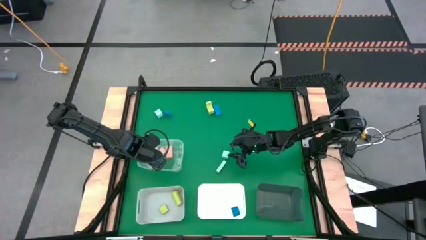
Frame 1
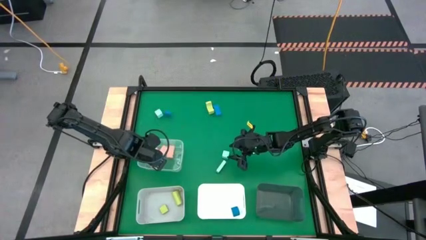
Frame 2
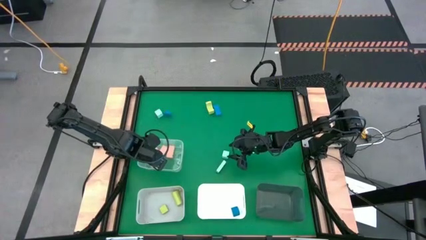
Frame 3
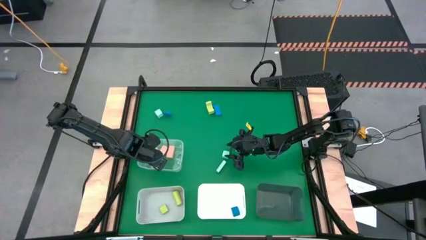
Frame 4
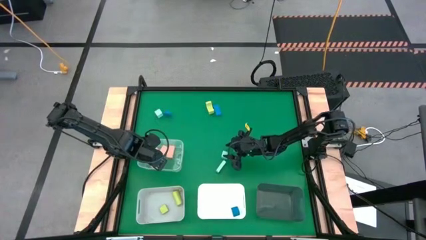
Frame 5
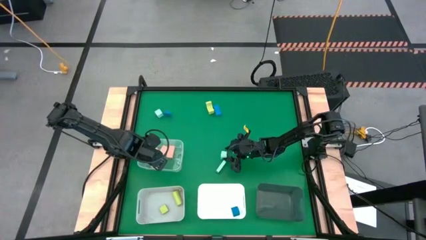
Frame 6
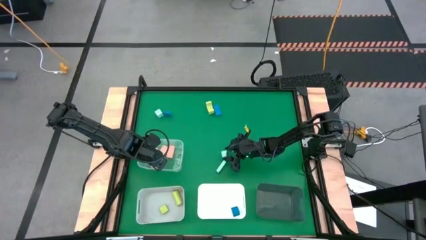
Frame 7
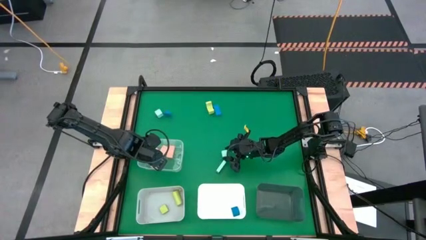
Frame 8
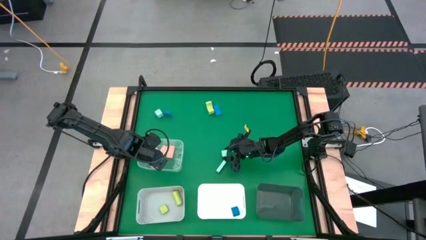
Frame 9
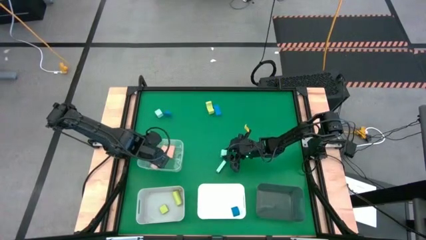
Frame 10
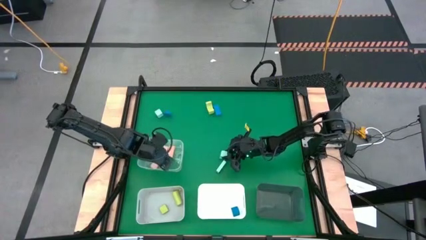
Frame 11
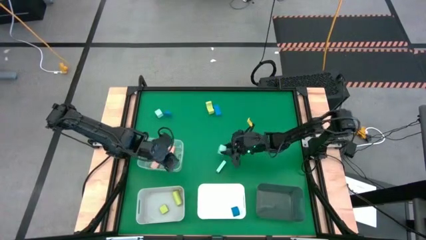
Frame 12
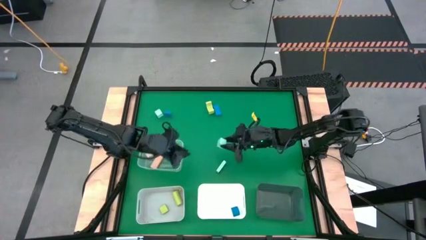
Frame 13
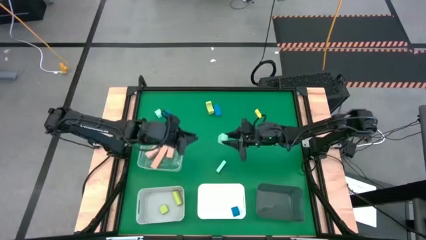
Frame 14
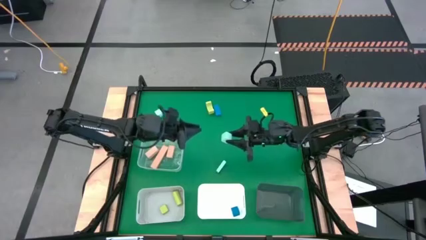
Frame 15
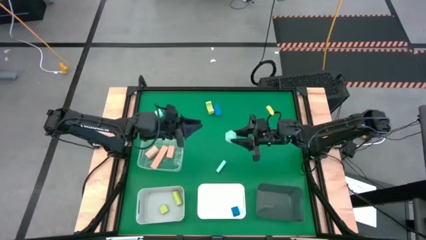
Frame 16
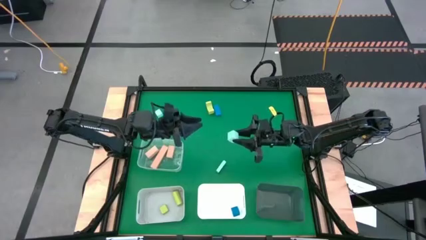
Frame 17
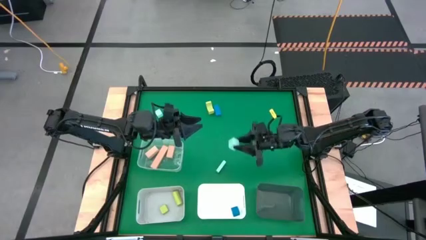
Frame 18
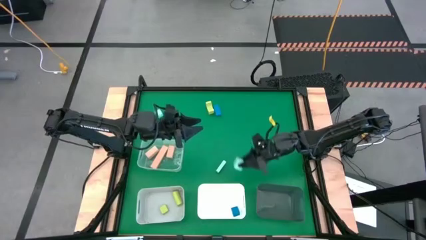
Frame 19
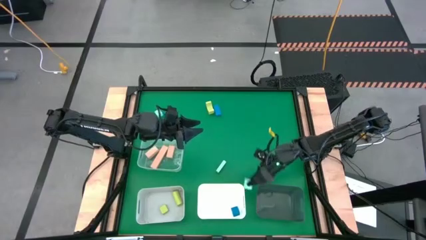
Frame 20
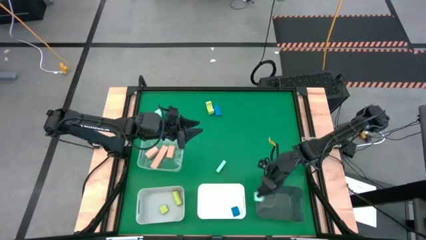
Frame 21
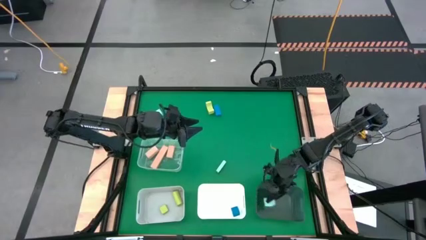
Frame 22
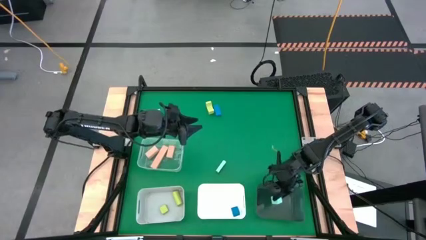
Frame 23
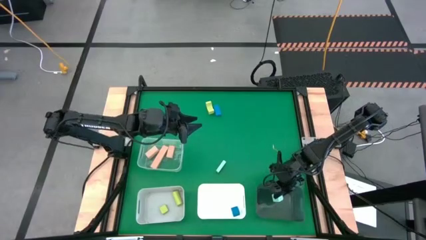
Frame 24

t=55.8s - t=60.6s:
Task: Sort & place blocks by color
Put the middle right light blue into the black bin

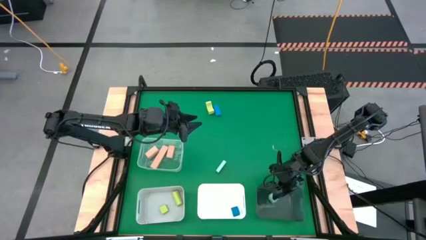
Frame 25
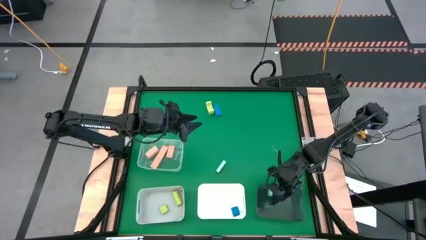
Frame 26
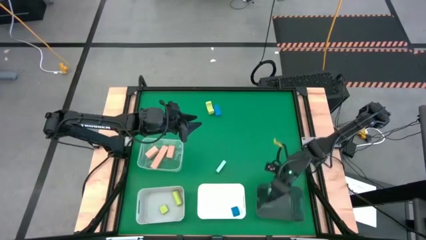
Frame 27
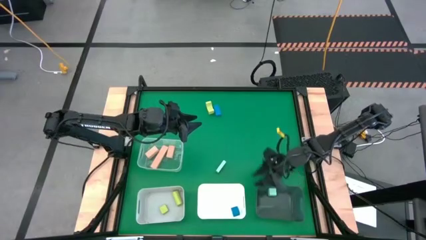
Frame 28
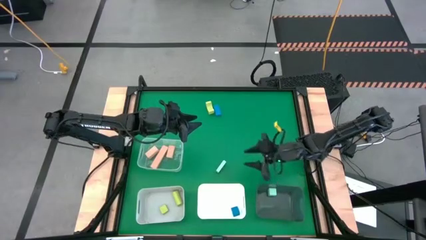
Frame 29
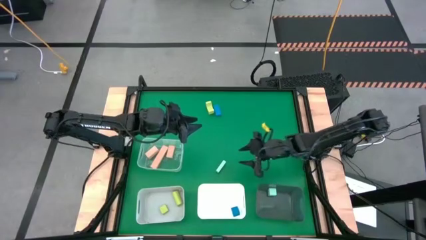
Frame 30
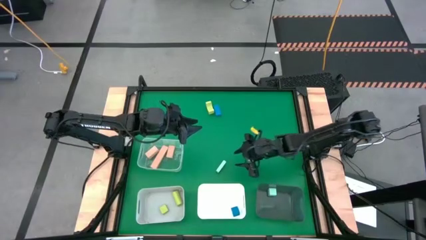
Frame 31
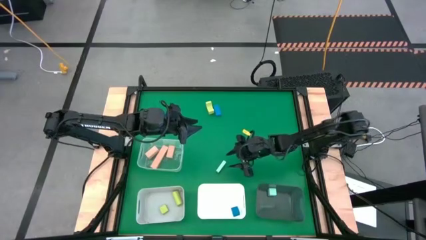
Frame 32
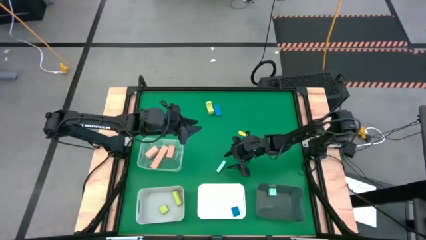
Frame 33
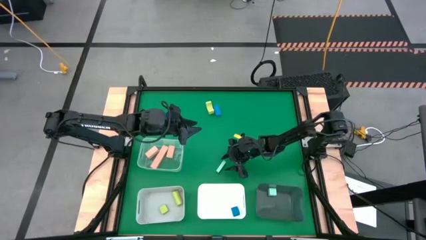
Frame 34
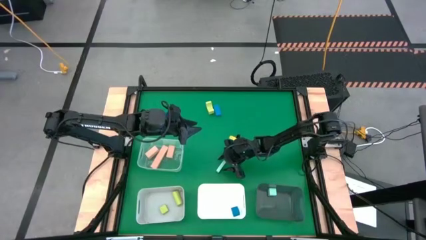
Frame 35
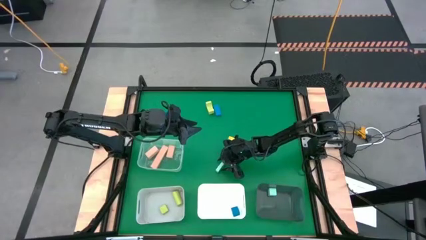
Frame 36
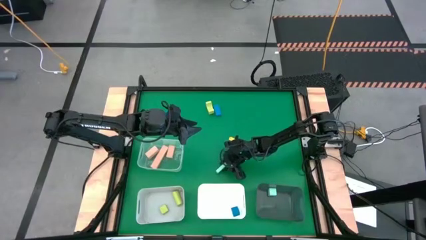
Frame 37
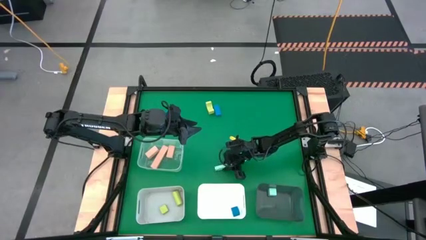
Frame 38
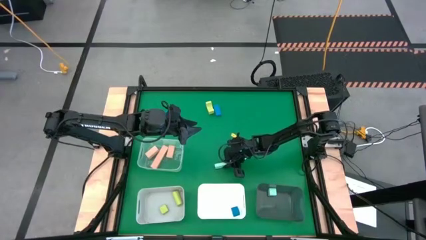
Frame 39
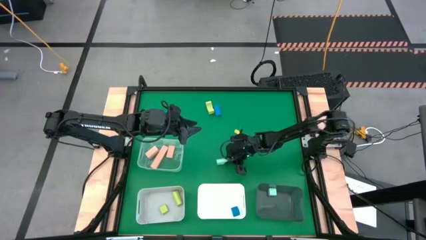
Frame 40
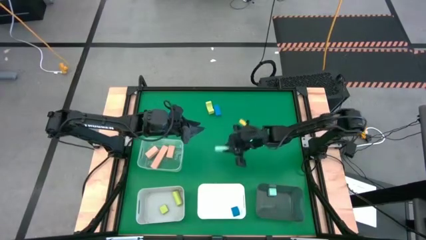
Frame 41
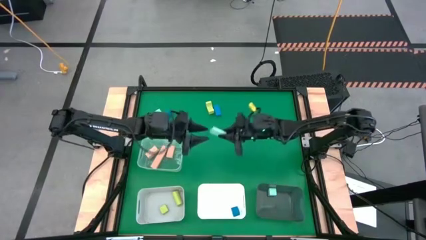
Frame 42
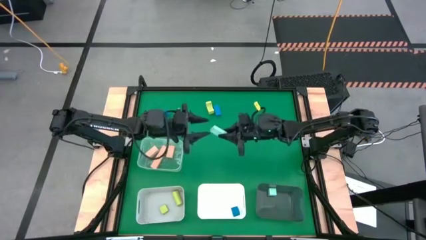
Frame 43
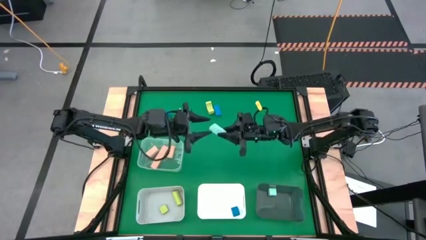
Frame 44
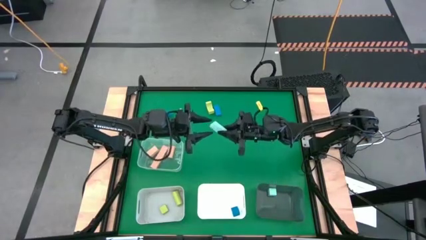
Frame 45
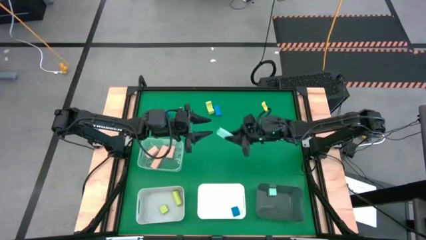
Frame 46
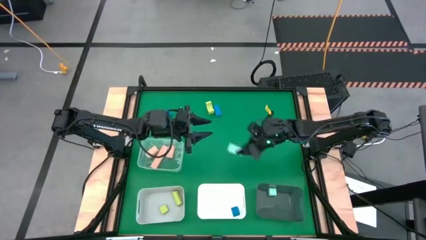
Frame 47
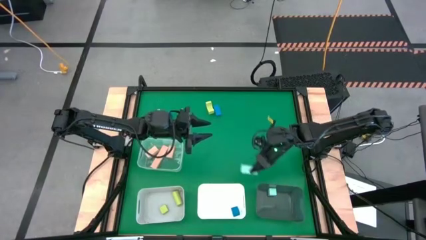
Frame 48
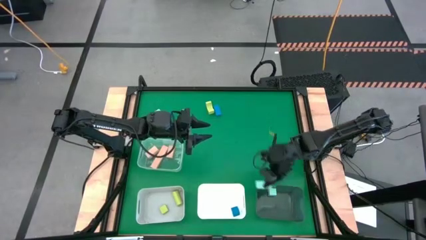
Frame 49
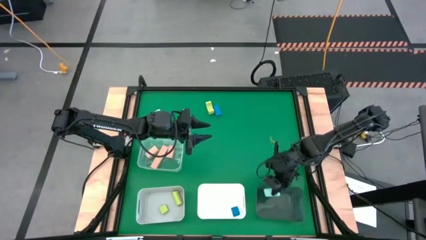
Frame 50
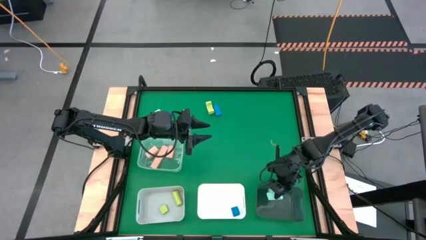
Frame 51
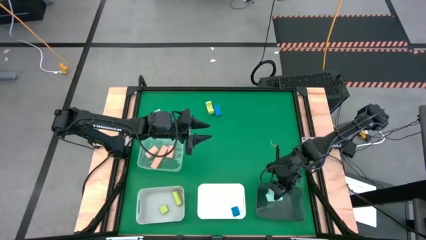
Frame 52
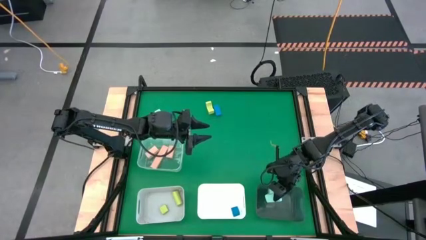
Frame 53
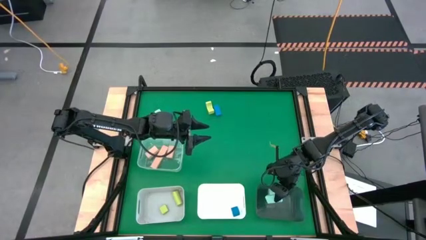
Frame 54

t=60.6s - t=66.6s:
Put the bottom light blue block into the black bin

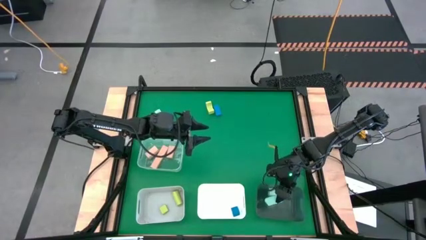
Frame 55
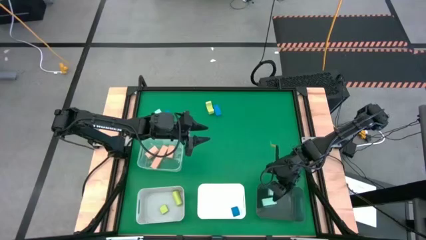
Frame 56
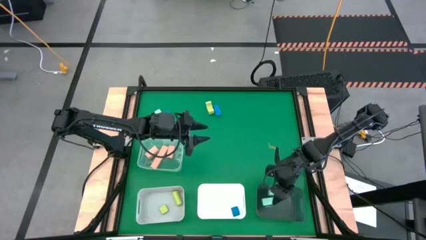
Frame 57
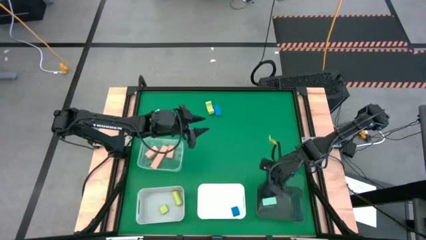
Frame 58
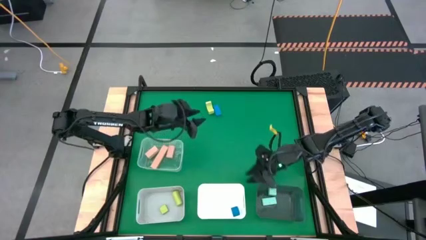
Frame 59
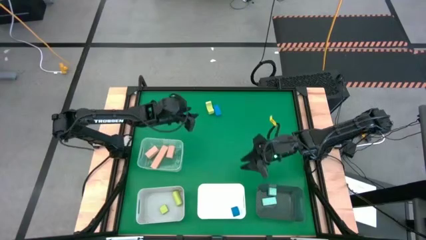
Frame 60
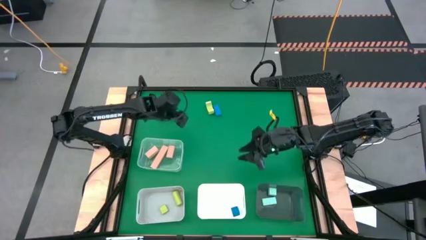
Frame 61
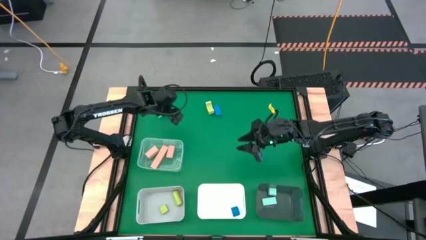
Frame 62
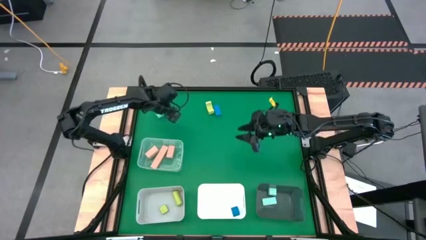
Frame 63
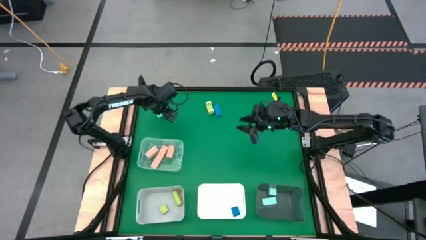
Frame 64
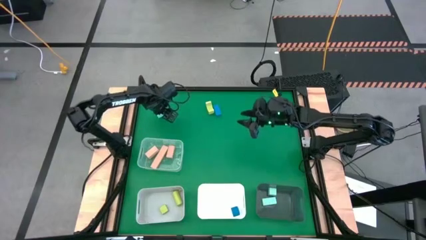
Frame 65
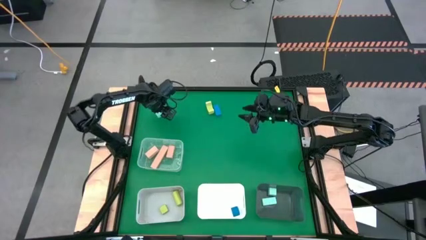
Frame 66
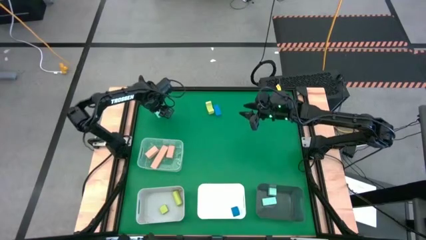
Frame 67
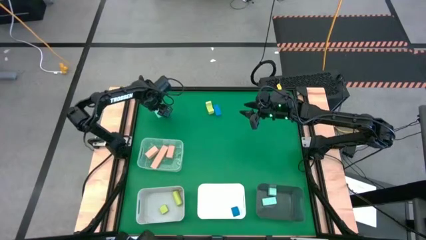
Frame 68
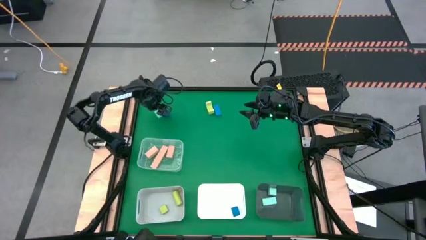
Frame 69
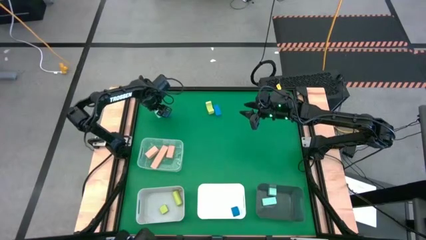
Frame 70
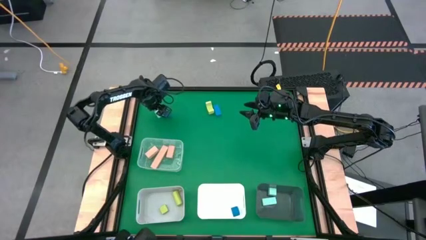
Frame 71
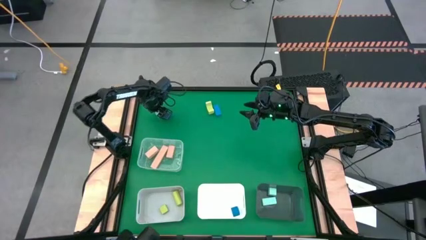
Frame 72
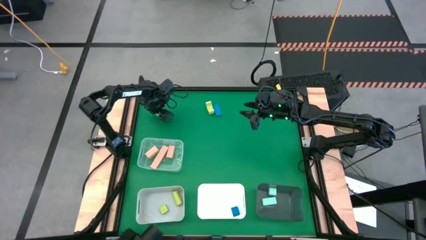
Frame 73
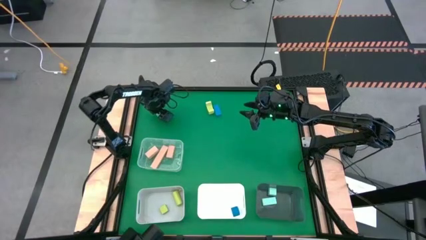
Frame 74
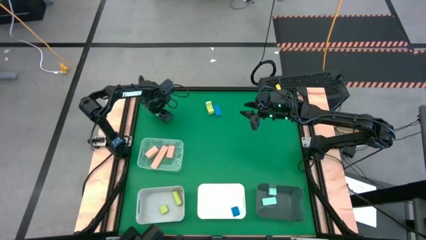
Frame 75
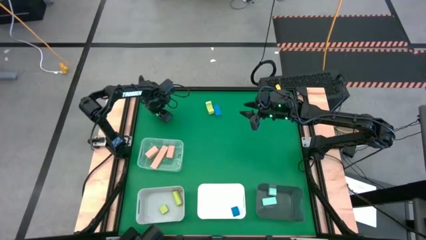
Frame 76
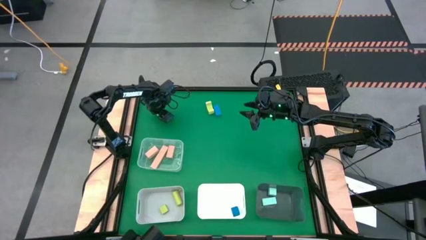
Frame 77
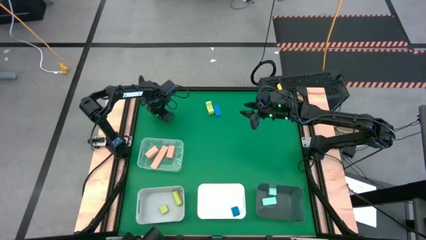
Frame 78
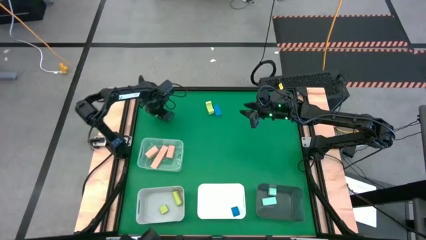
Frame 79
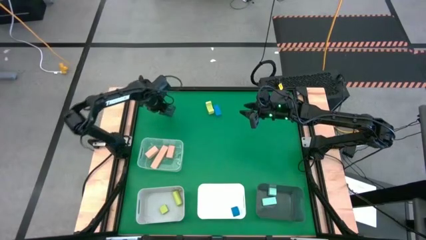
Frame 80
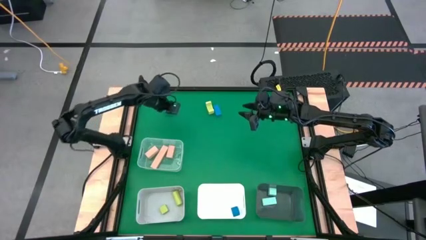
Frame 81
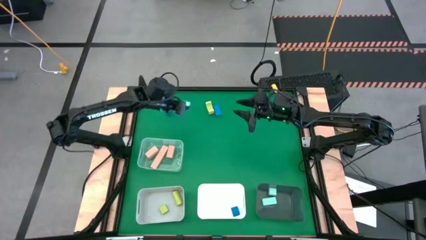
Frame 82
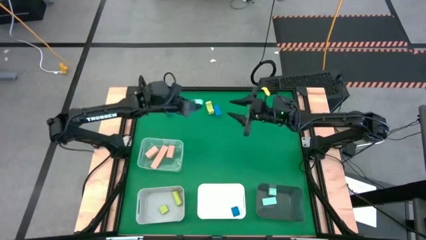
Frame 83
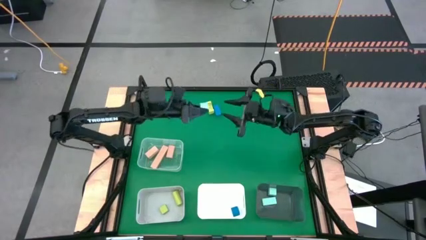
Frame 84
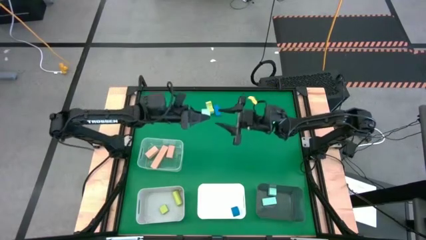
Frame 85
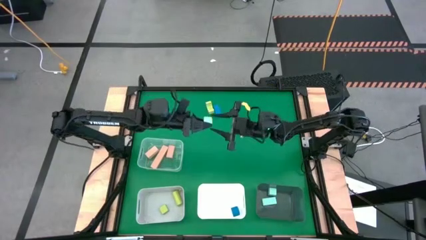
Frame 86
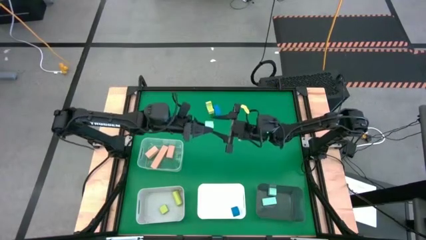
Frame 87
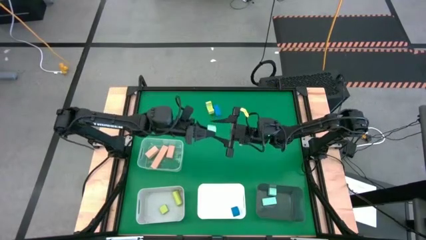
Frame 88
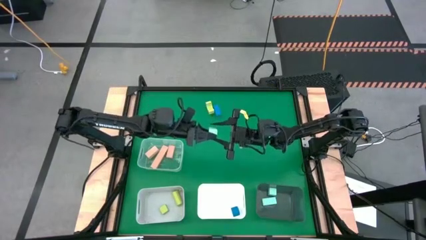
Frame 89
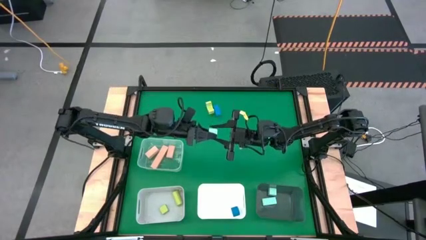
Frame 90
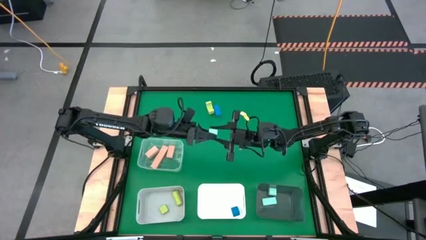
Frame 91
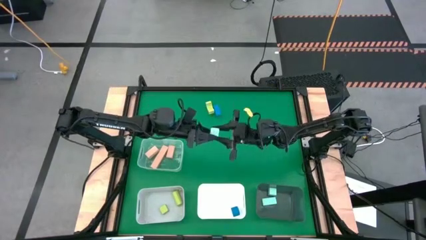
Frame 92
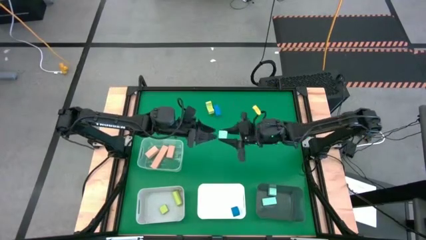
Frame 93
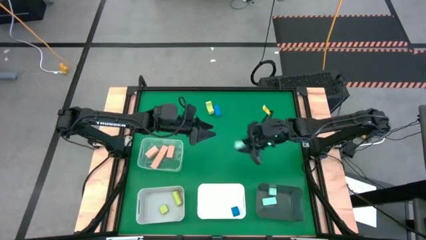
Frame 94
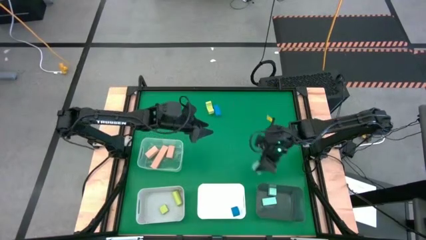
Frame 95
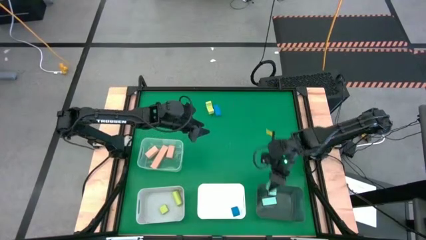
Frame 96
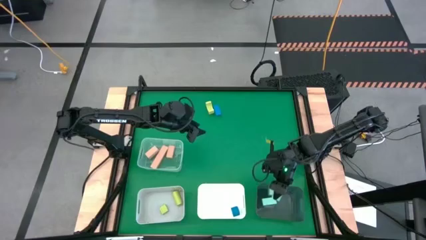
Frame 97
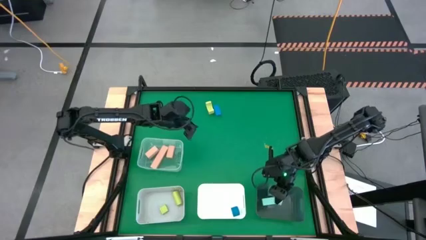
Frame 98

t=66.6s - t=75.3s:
Put the light blue block into the black bin
